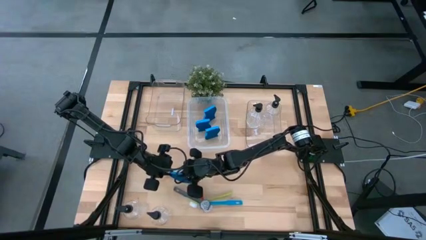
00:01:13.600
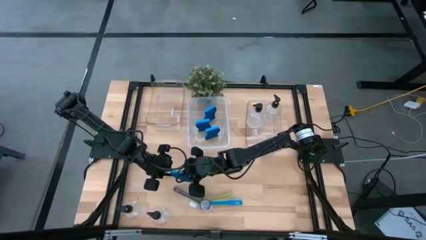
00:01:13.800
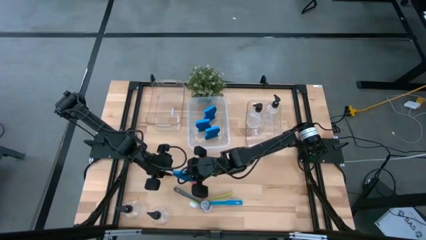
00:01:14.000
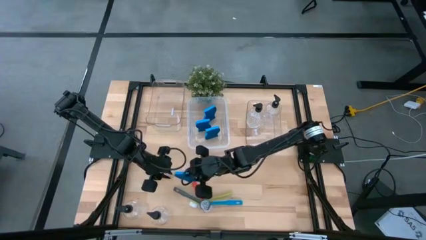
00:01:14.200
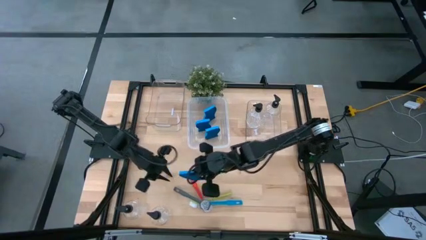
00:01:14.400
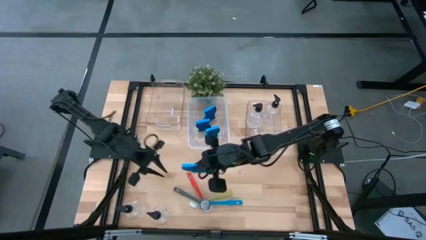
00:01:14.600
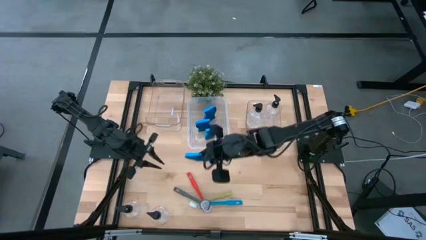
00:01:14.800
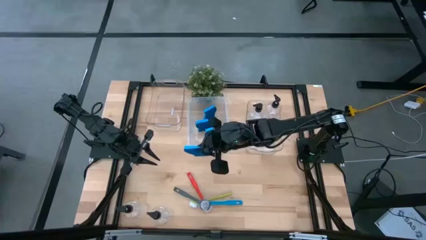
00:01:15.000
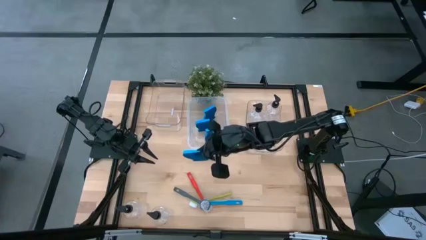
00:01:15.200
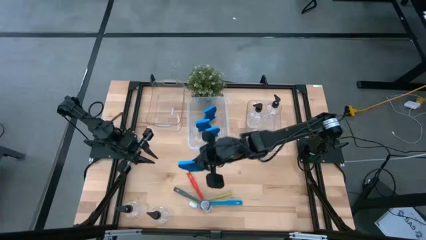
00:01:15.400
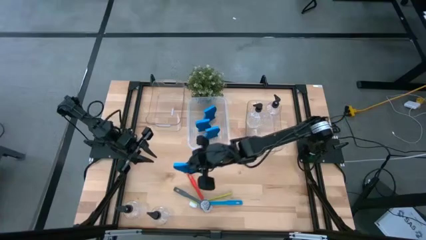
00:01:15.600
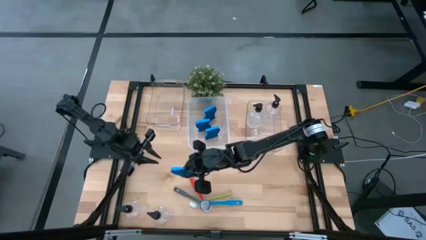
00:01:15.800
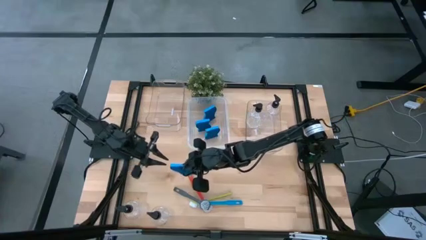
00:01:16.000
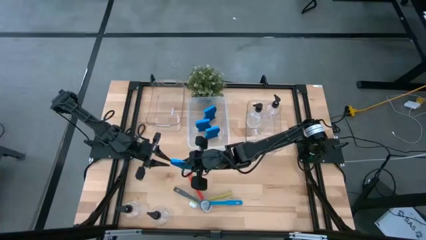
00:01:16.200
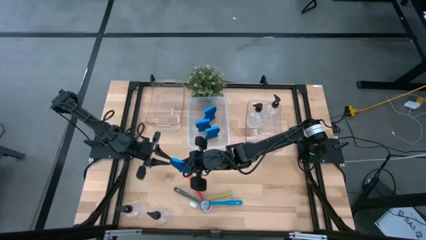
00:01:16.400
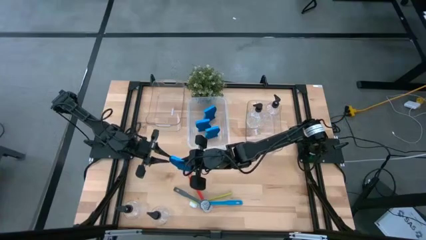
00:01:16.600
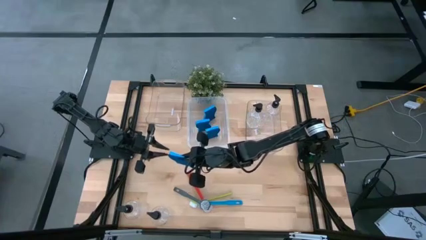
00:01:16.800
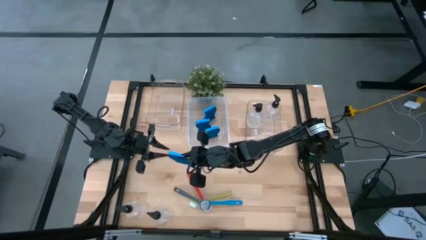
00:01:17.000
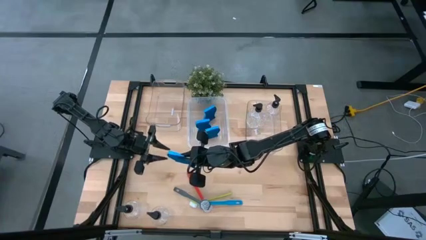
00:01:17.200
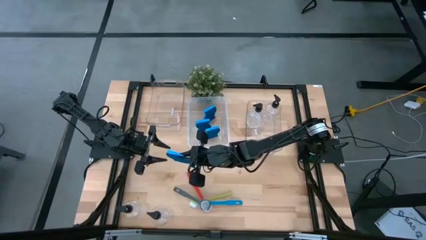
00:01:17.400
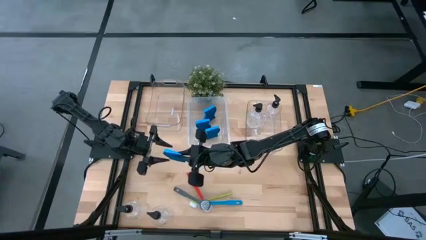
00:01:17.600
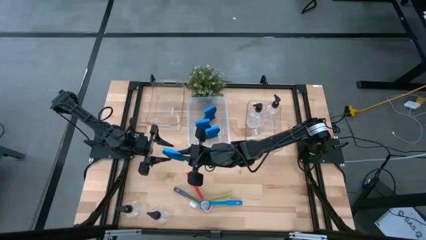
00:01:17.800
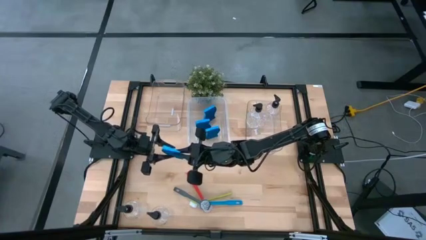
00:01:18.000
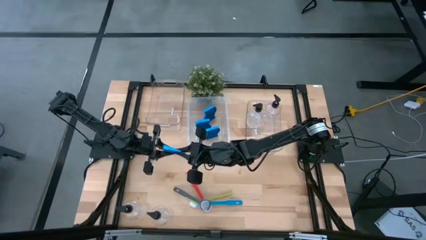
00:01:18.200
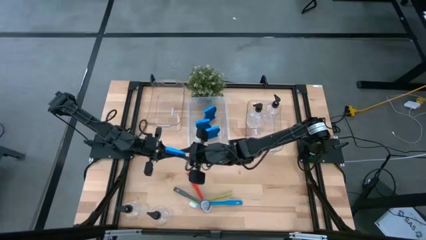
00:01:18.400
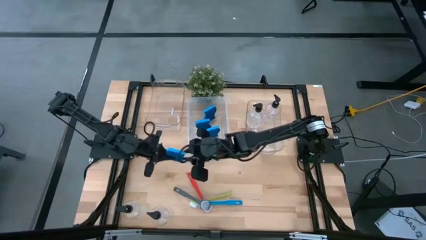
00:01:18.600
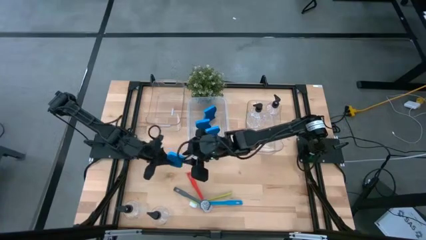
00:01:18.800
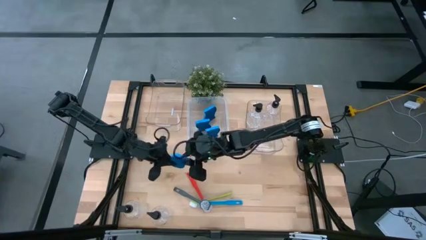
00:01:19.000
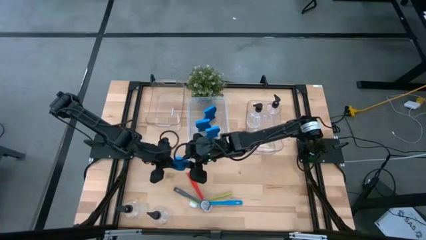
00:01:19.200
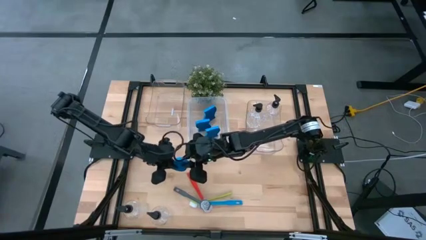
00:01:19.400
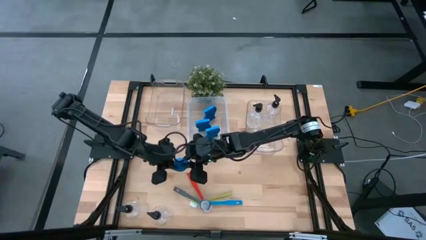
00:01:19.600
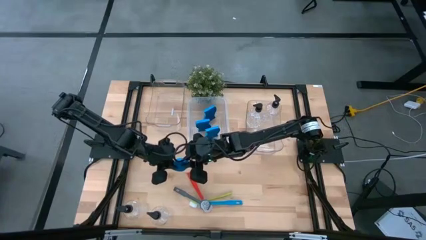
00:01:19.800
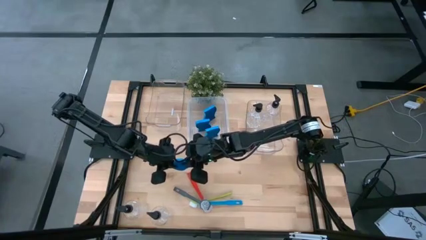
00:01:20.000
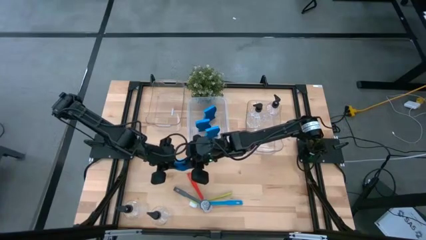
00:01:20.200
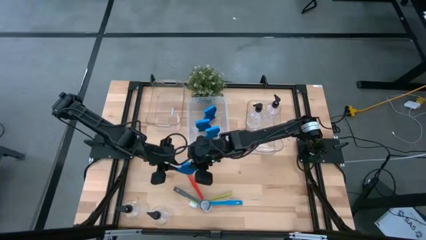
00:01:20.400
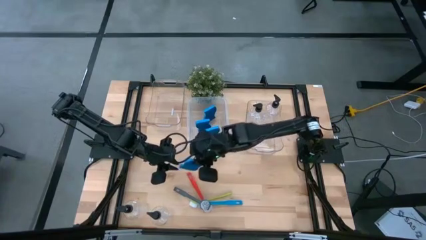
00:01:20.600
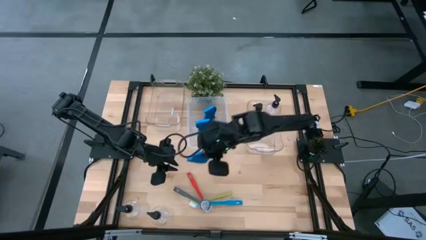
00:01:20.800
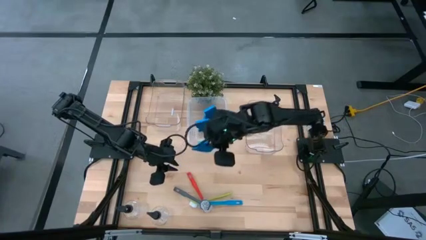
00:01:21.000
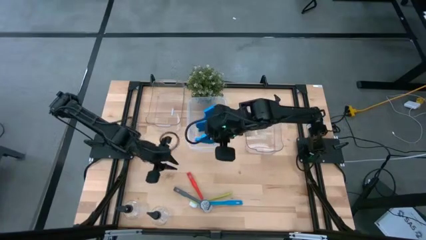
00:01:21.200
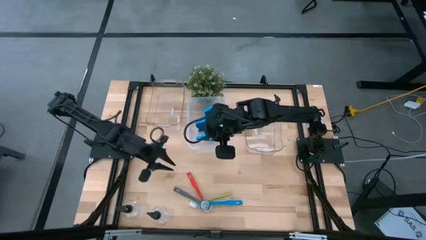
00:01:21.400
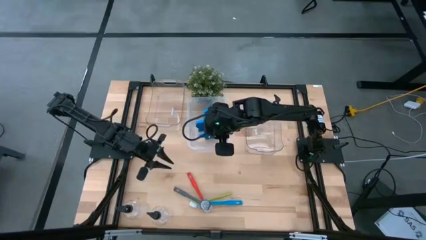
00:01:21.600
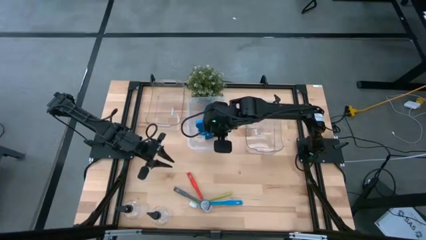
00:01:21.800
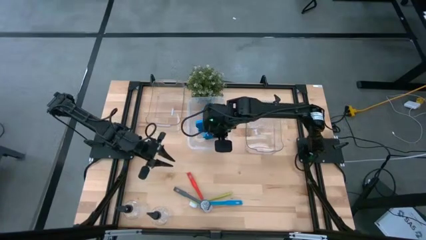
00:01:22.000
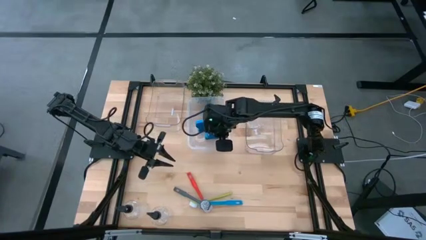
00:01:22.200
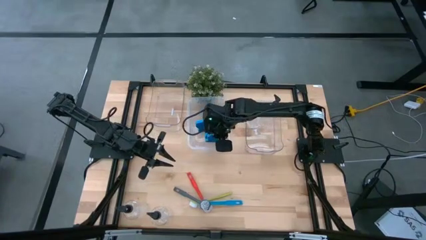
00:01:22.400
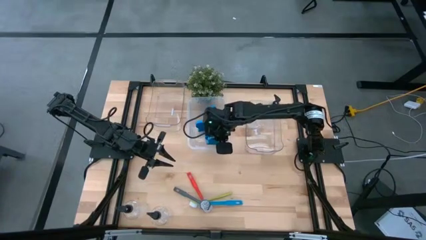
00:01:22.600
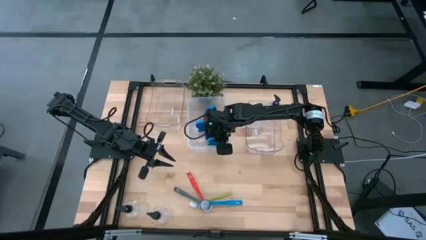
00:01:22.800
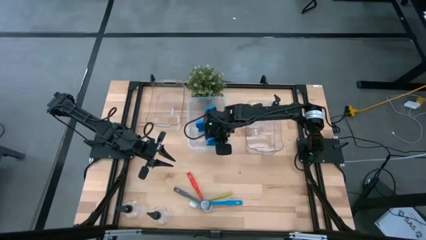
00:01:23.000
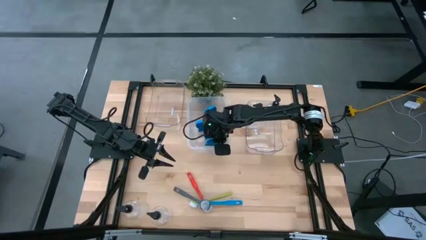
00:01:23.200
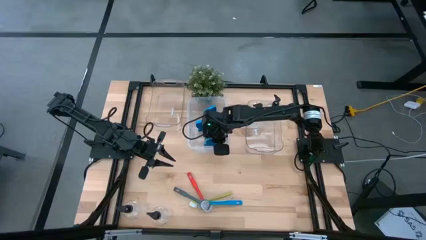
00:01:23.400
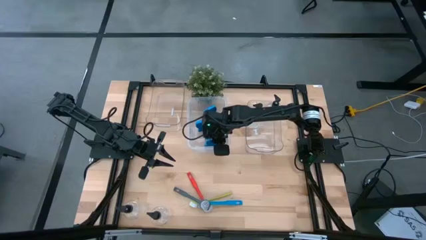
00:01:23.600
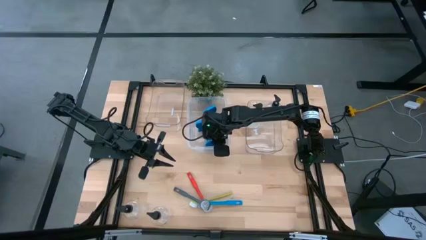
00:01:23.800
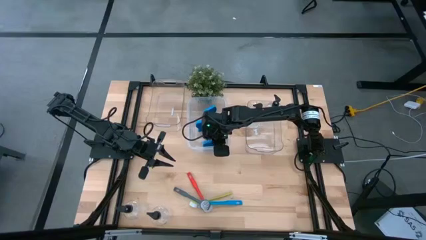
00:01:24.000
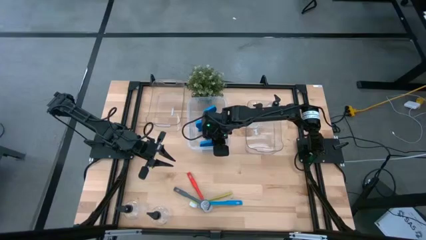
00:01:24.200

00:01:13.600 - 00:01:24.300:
Task: Pick & Place Kitchen Sink Supplies
Put the blue sponge into the middle transparent bin

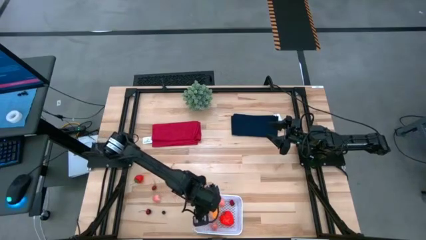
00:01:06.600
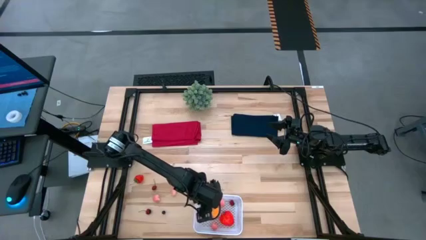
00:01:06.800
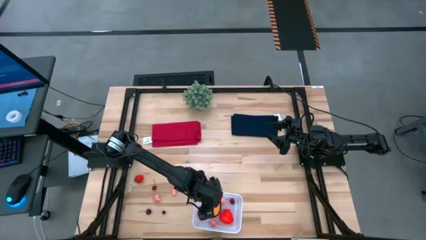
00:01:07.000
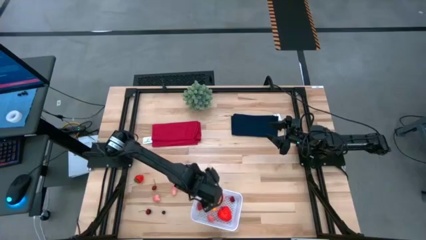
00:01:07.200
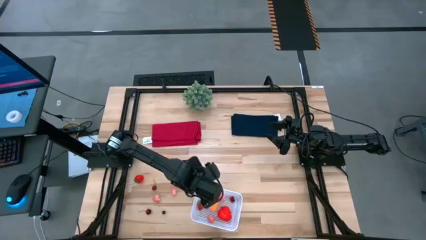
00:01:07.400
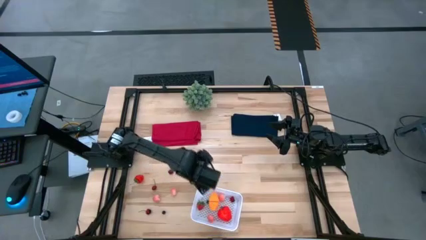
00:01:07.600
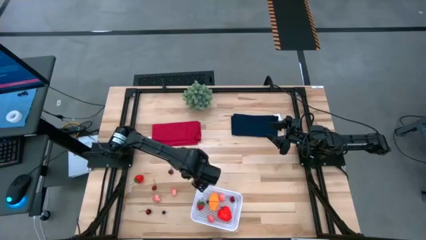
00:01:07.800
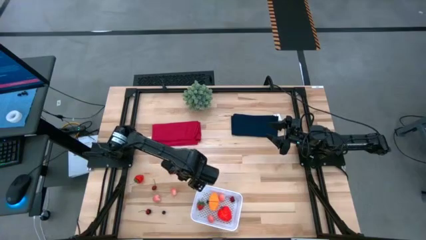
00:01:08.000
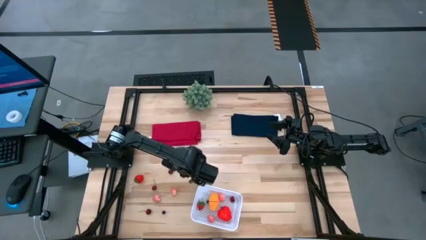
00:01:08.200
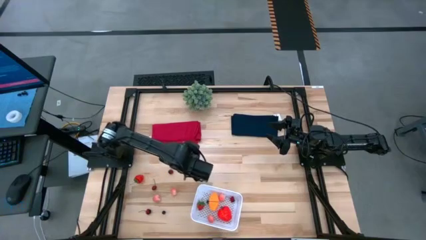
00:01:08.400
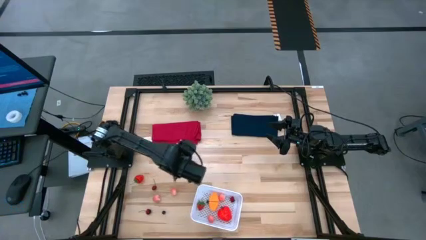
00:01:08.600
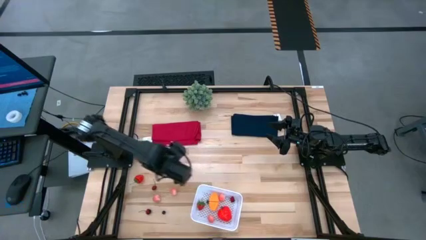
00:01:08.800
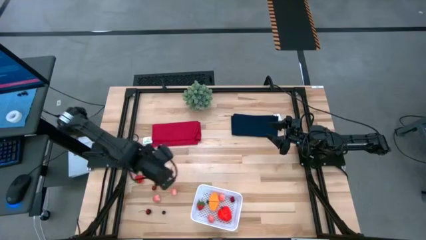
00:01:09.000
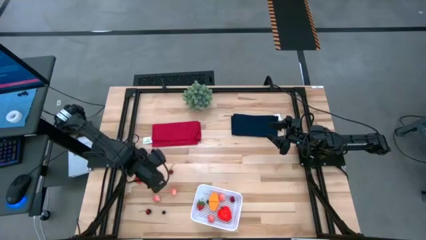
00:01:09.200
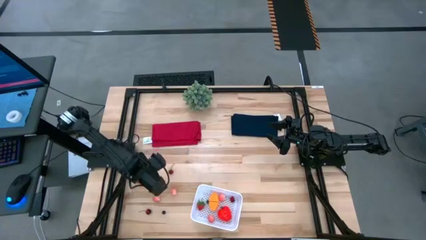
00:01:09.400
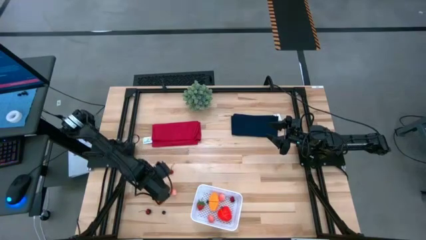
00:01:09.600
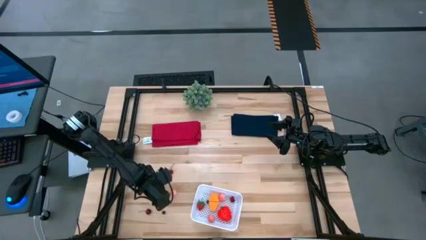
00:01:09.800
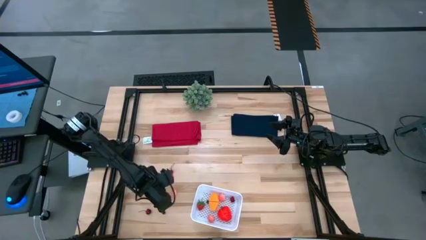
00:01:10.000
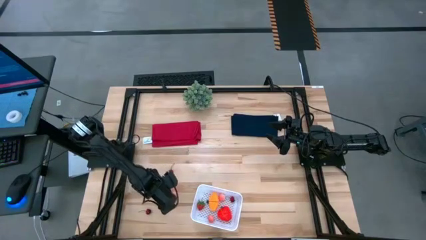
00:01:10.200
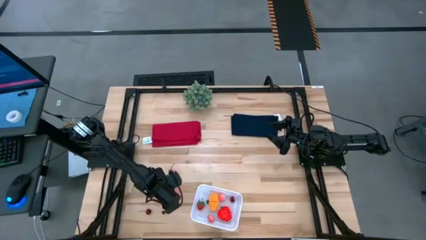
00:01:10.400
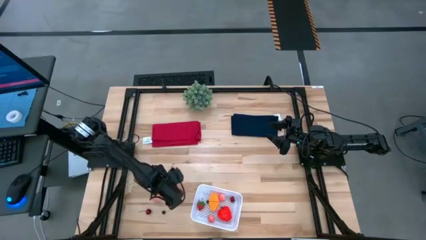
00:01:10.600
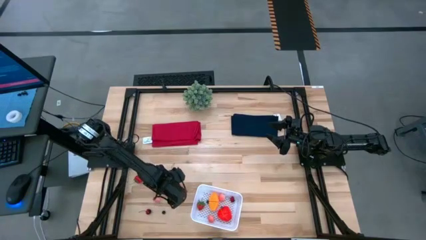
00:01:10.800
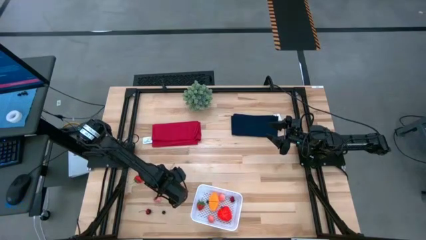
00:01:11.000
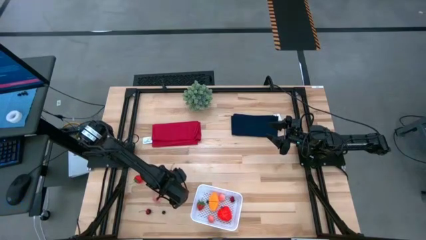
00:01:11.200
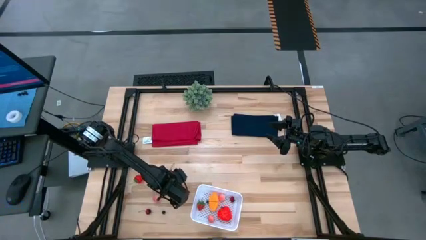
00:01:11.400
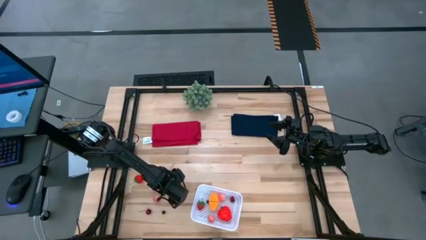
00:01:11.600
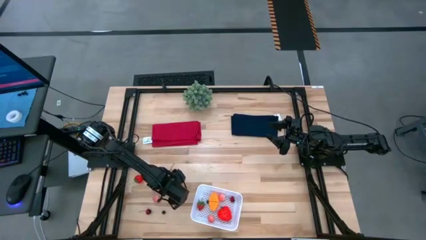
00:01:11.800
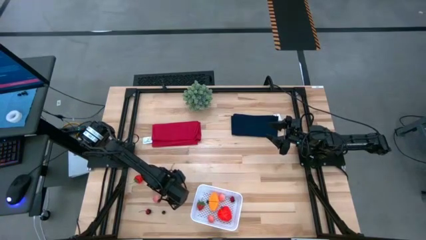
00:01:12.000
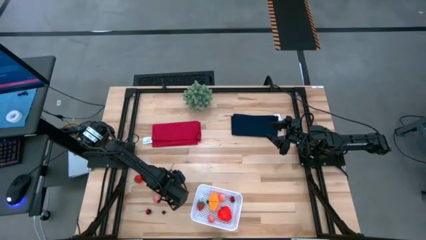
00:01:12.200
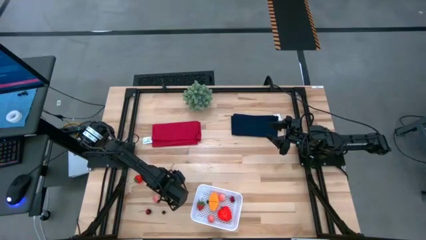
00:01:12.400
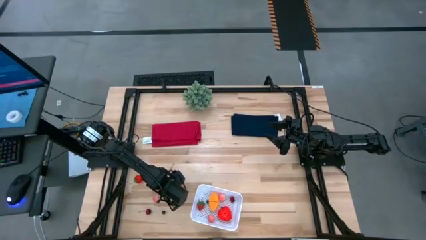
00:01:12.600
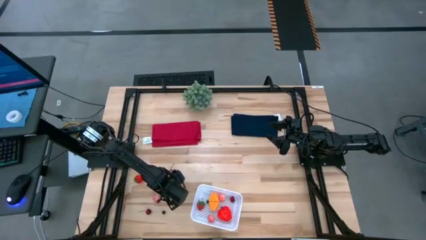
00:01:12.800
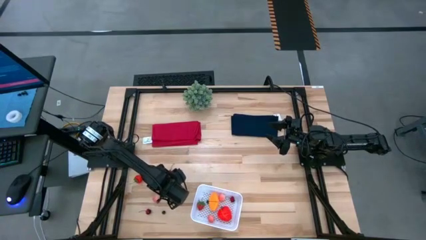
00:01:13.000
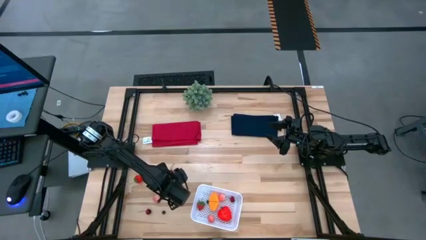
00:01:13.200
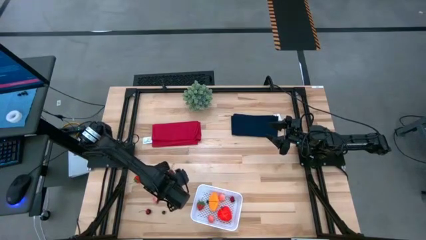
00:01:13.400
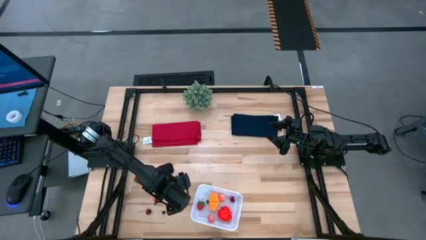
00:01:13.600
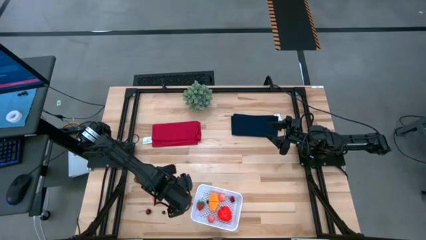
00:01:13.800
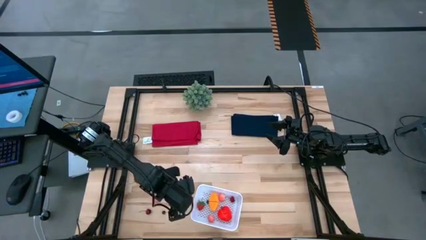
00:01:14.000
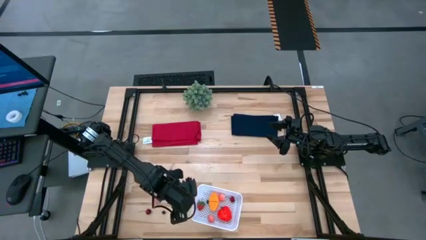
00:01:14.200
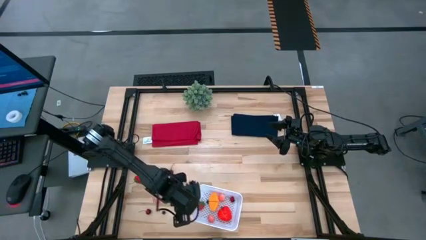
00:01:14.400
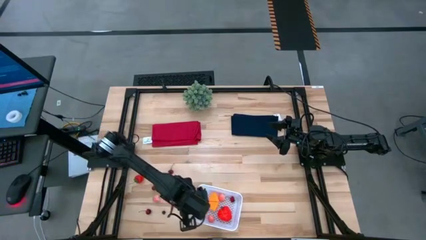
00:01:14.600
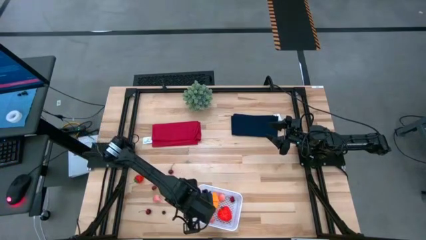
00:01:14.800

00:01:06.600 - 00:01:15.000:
Task: Pick and placing Produce into tupperware
Put the right peach into the white bin
